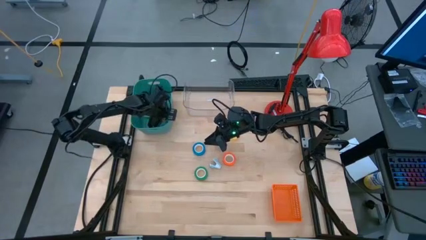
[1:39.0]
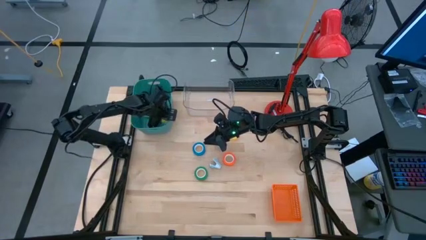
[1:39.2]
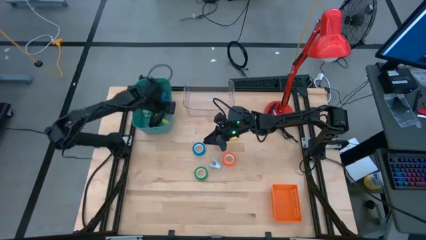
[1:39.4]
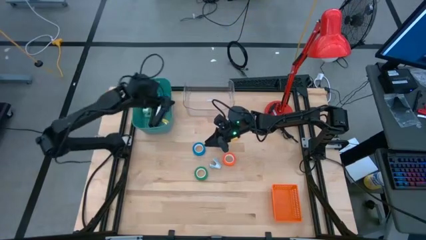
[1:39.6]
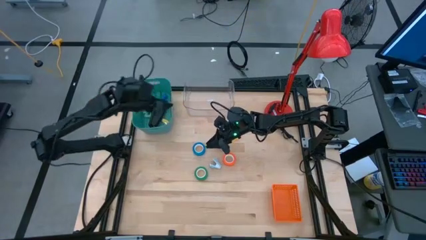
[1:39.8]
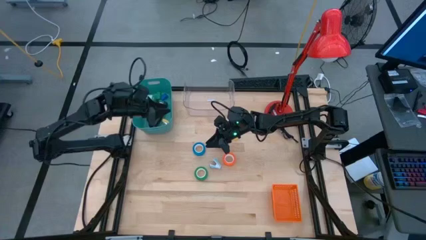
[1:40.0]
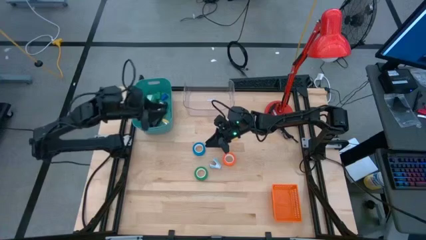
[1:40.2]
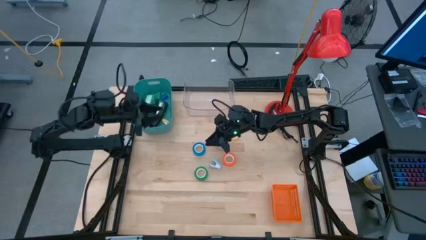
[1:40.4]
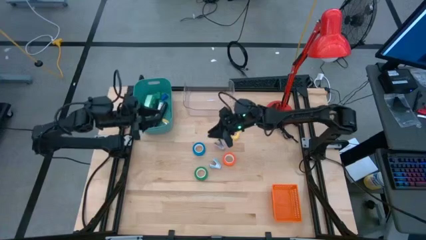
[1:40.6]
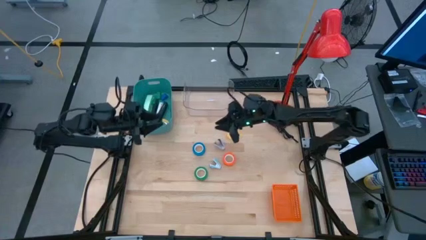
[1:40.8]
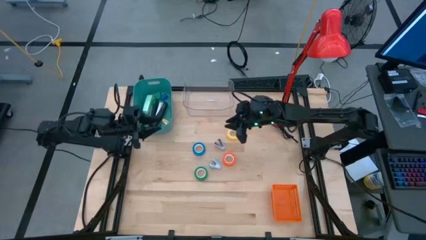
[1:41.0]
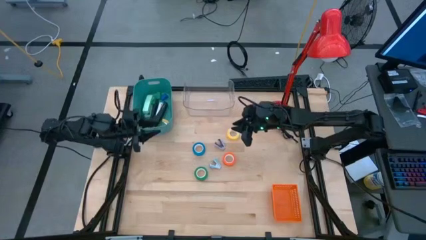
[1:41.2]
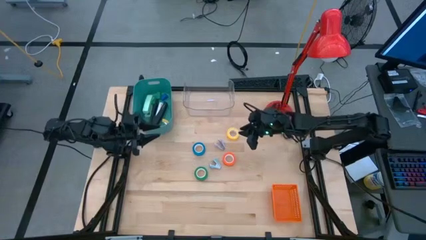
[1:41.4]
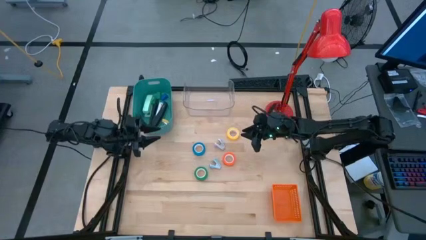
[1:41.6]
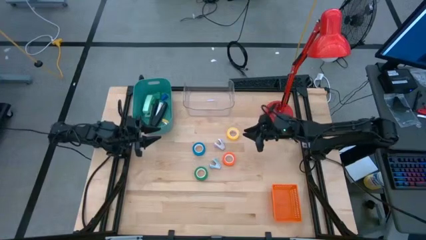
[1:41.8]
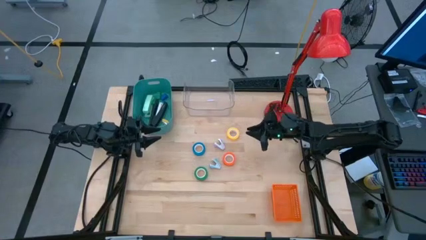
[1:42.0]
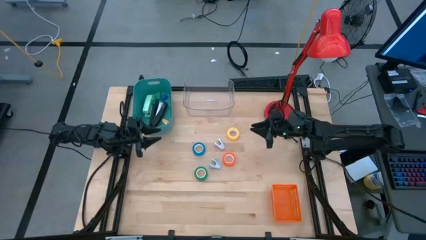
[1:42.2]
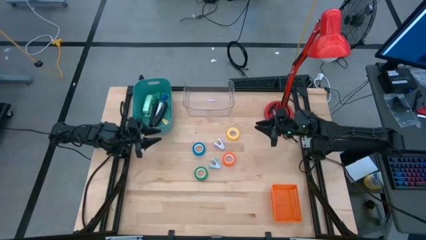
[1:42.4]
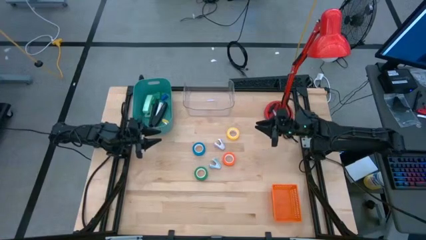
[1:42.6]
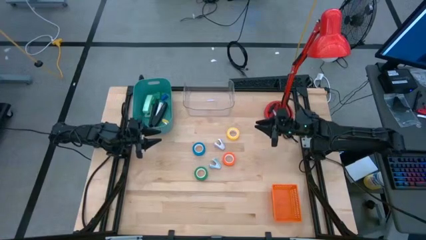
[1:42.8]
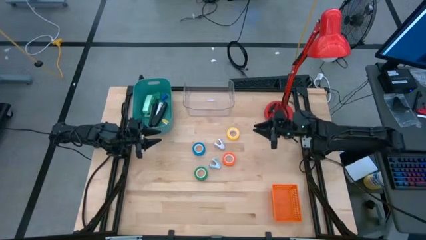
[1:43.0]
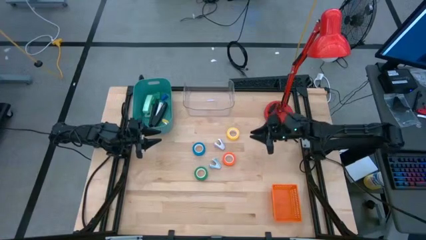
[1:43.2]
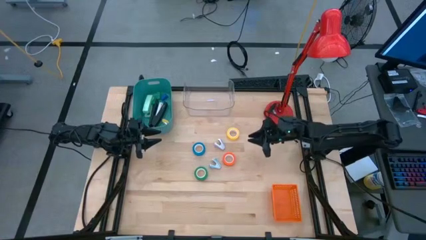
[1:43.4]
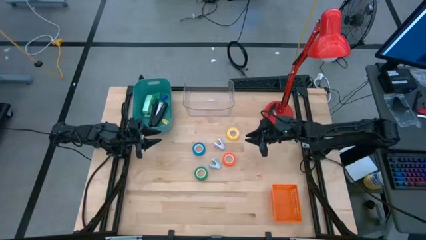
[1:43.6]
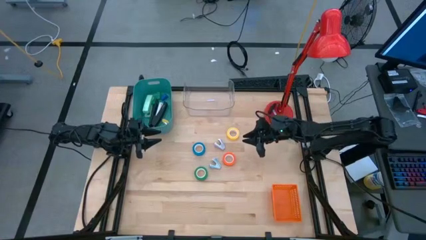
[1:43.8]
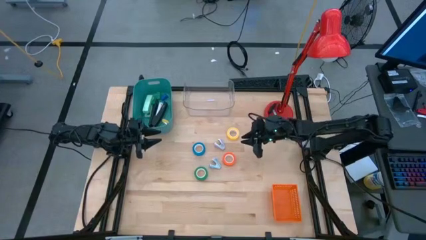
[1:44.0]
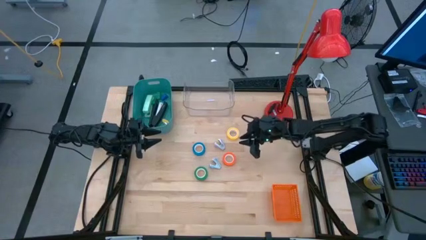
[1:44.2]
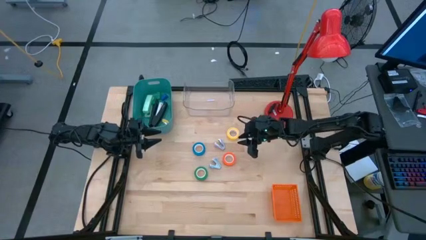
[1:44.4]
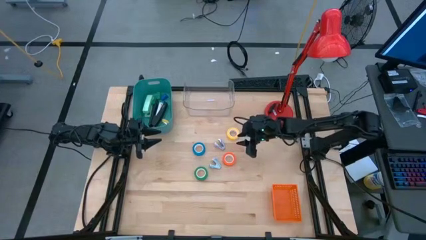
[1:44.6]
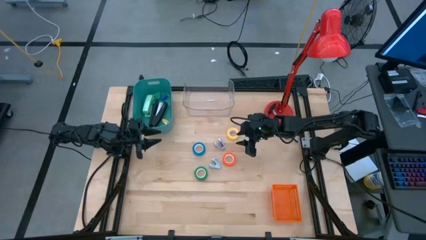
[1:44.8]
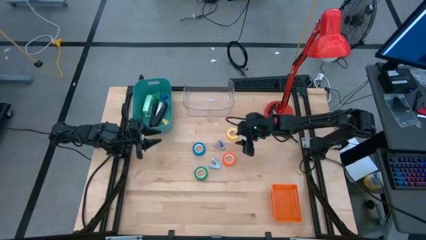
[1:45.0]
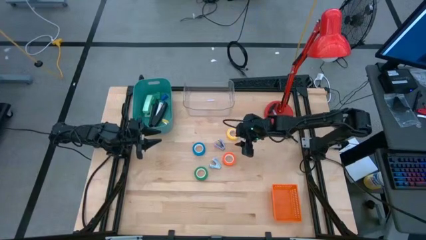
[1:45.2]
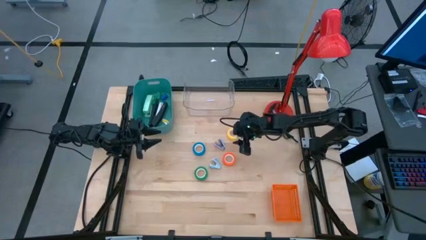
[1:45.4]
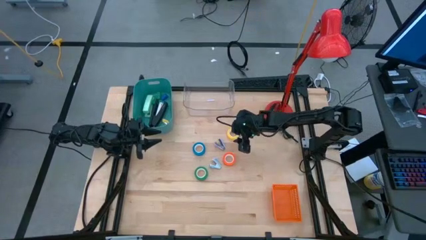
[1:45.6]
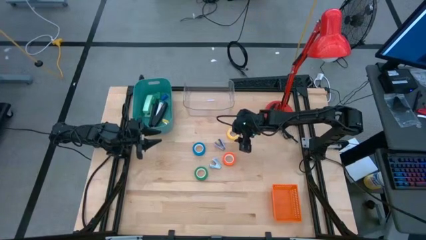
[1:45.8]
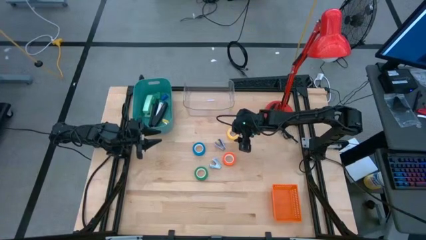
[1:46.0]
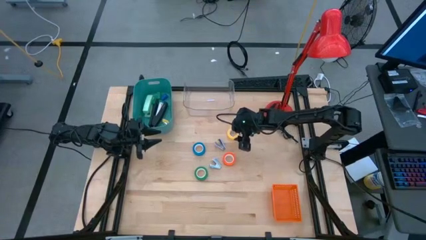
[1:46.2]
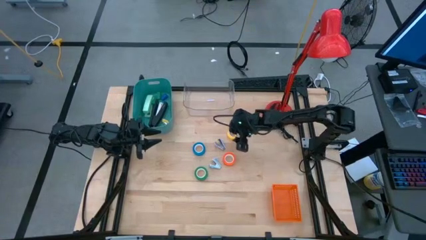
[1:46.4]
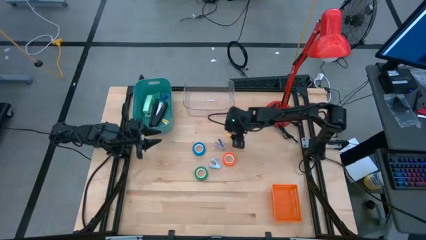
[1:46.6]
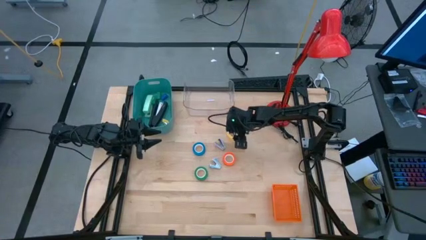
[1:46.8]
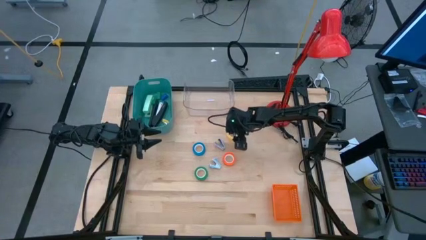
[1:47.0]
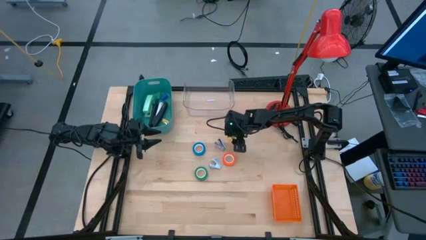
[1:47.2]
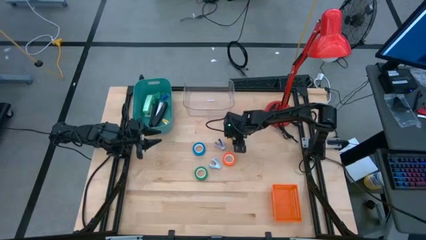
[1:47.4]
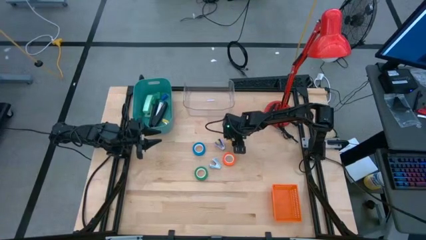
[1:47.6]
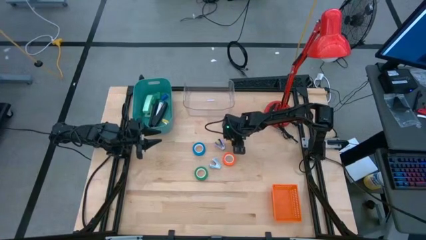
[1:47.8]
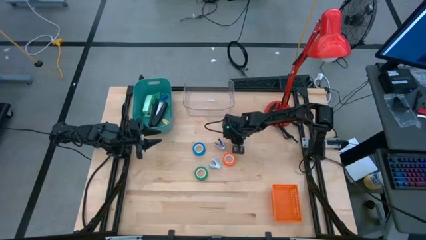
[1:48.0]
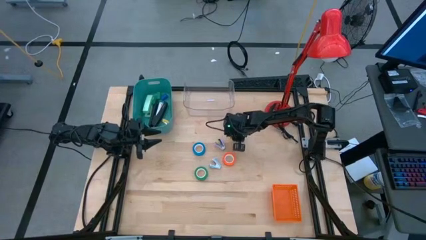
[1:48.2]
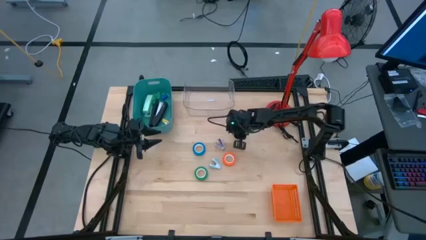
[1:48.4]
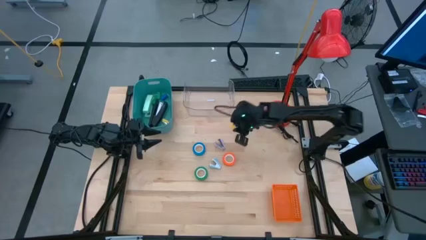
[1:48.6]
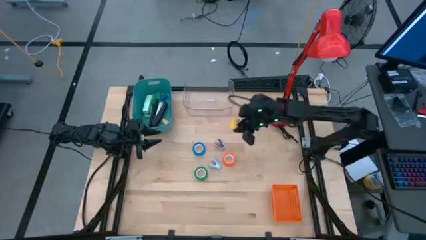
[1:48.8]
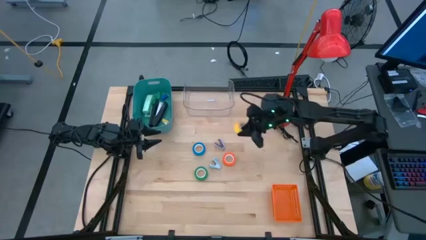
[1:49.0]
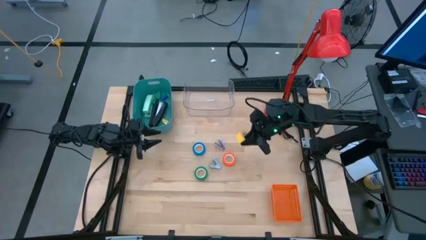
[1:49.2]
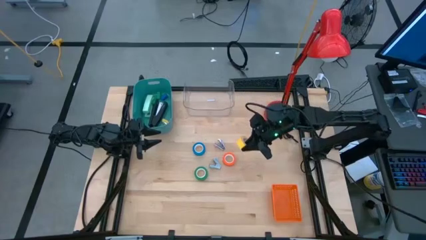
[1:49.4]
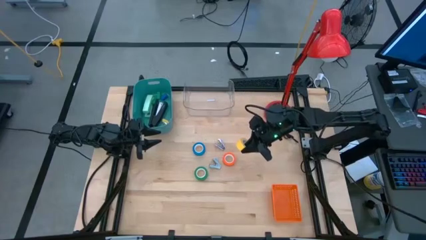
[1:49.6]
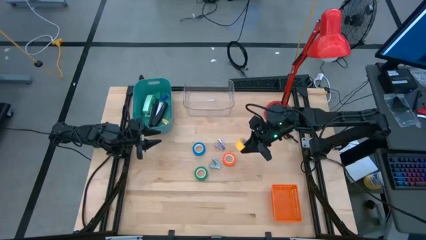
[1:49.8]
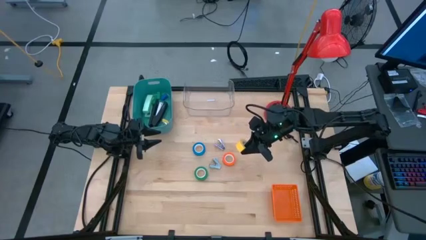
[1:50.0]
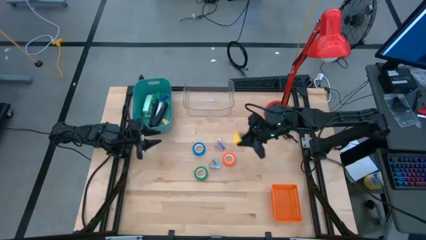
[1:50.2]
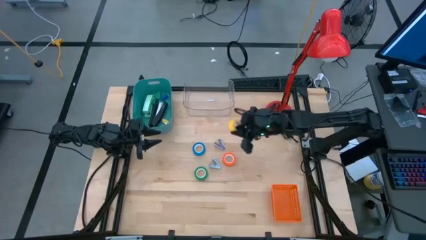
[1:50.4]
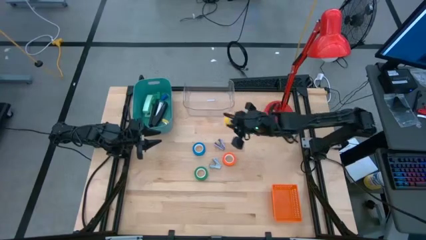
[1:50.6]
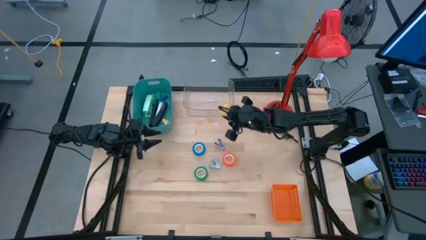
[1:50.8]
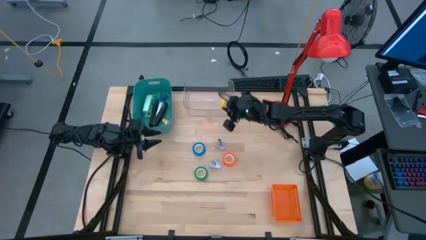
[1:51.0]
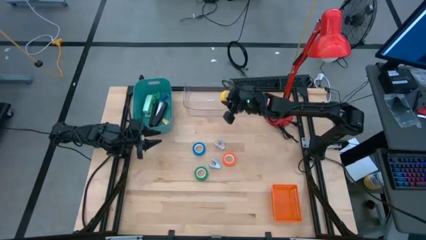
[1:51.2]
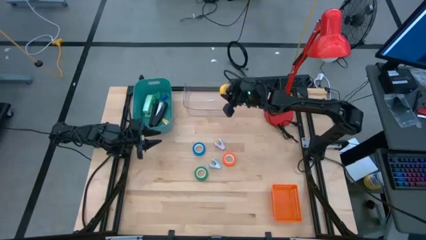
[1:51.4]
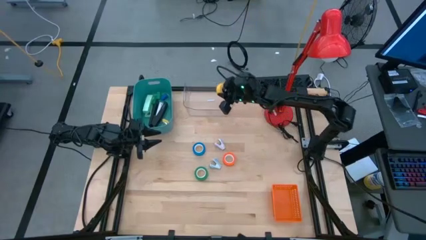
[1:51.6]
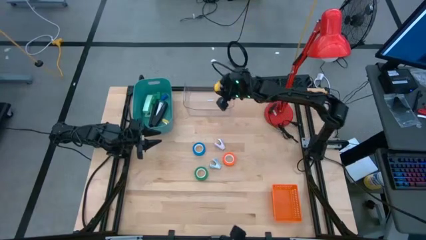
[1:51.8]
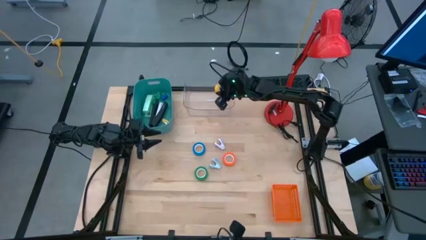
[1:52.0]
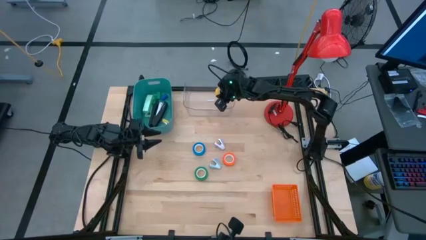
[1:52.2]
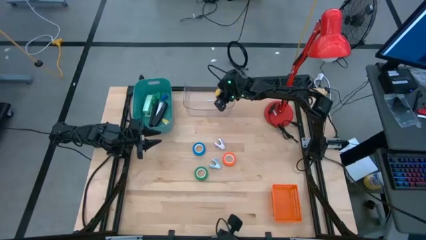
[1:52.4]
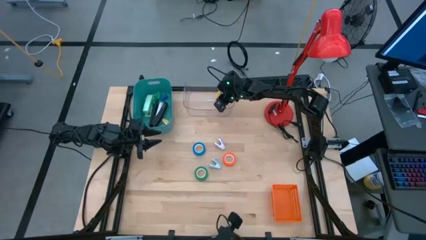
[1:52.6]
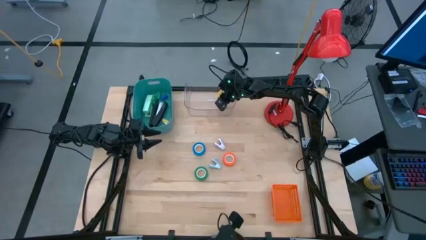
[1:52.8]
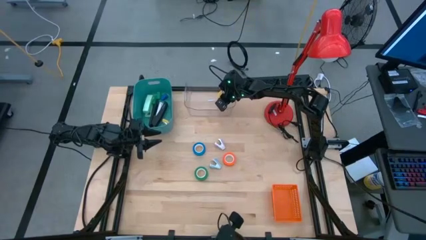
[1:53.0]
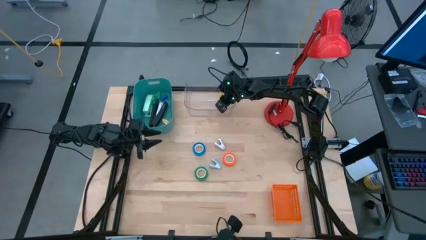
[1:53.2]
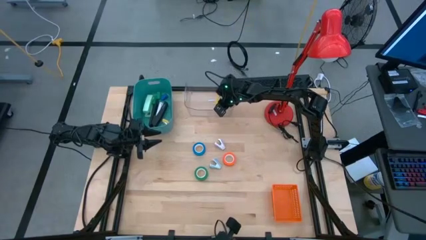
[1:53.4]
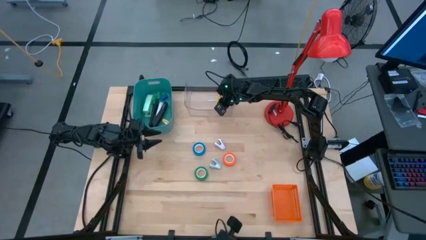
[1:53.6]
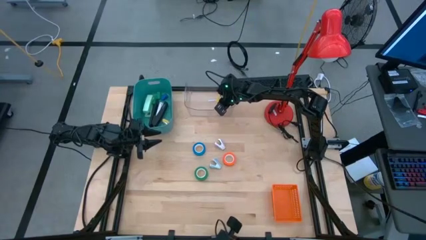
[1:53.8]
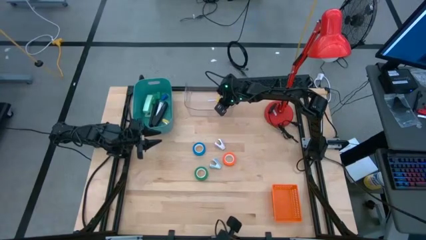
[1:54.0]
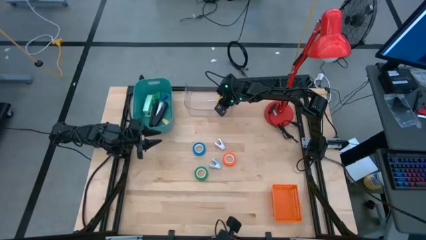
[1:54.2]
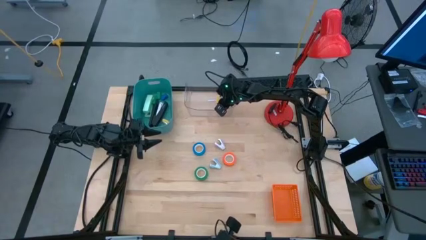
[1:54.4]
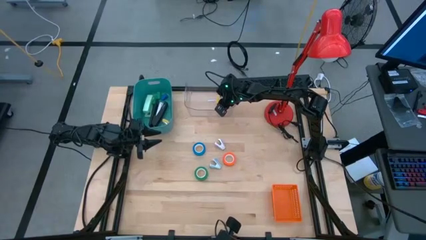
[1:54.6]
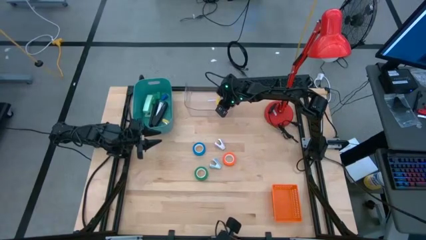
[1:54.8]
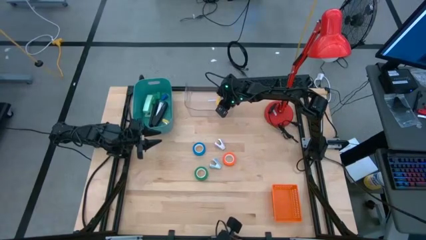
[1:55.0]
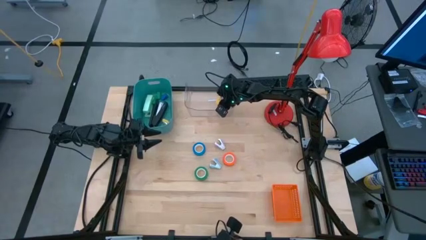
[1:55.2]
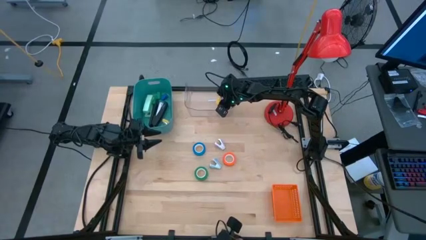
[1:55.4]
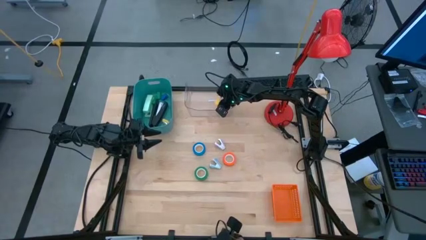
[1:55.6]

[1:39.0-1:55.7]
Task: Pick and place Stapler, Stapler remover, tape
Put the yellow tape into the transparent bin
